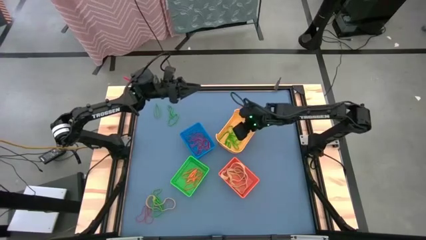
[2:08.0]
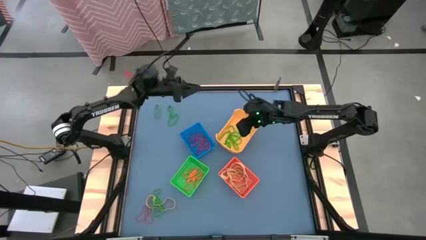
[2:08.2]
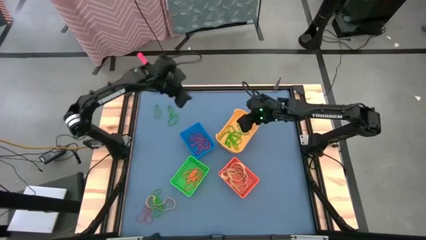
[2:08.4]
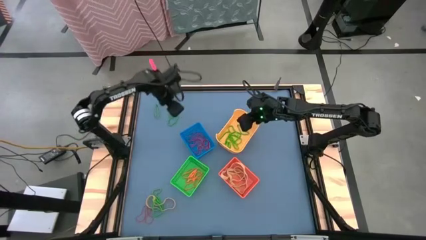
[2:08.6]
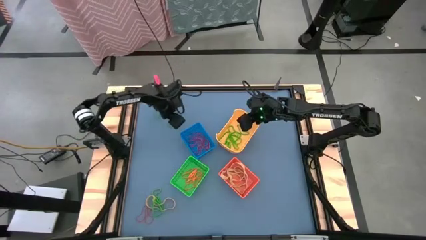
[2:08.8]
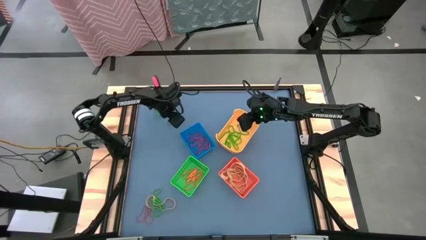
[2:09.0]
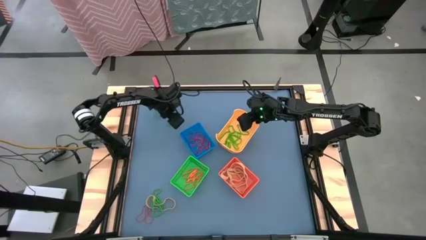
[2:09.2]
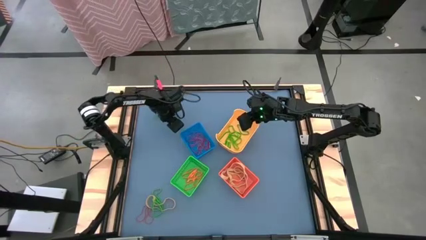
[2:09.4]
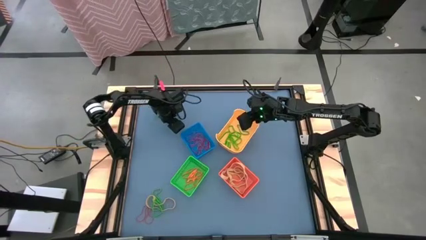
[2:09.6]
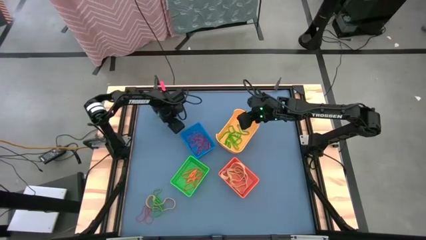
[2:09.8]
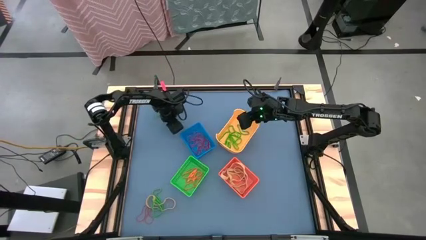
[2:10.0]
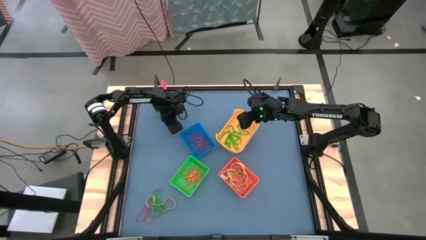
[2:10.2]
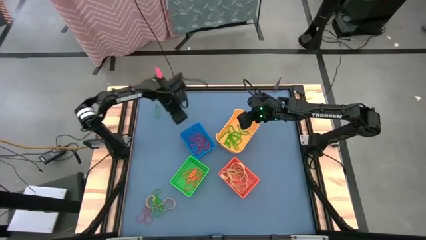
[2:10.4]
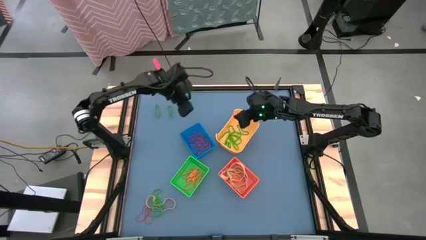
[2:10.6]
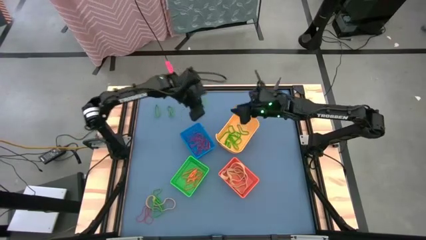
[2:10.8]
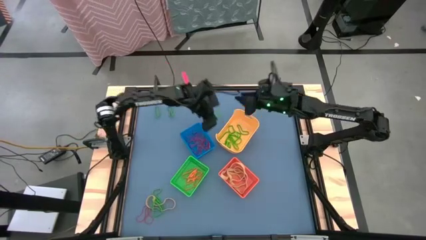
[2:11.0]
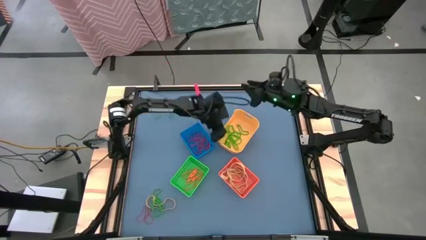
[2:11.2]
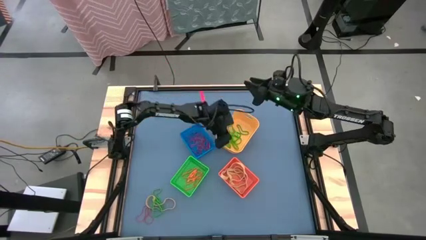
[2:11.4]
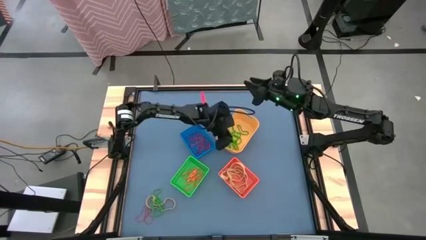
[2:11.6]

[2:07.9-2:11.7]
Task: Sort rubber bands into baskets
Put the green rubber band into the yellow bin

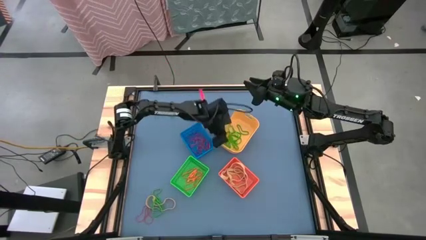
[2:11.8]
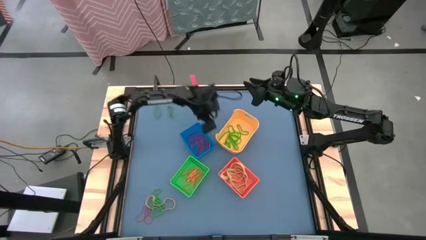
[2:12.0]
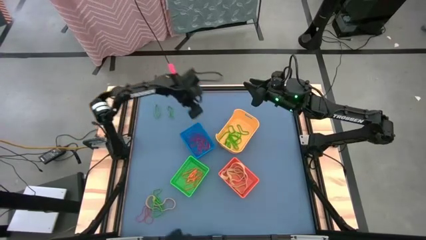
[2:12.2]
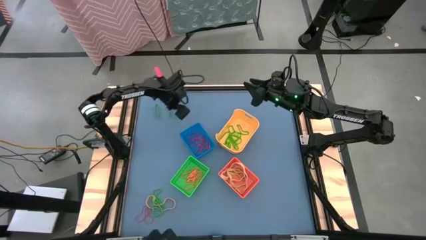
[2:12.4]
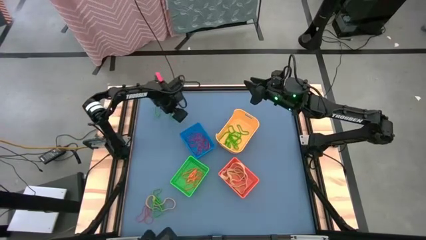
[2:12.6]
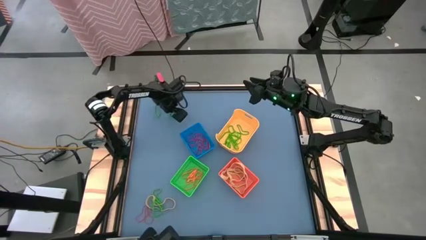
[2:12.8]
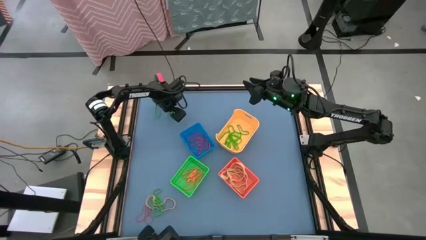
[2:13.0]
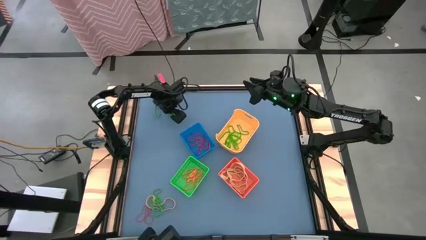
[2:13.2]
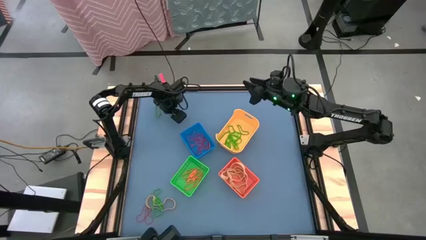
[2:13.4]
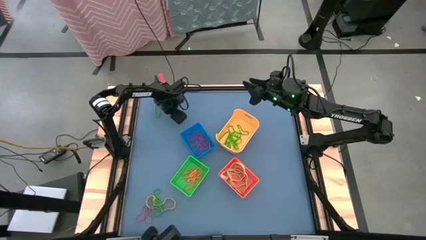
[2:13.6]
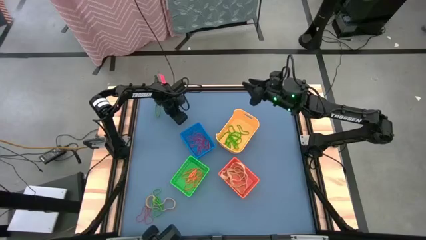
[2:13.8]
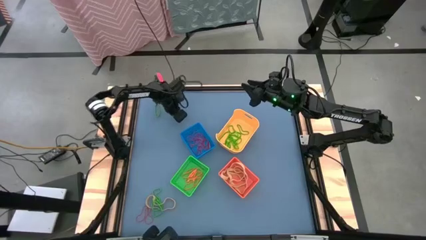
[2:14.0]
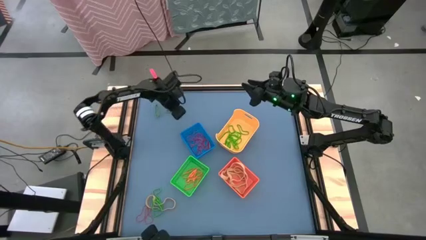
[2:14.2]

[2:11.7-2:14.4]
Put the green rubber band into the yellow bin

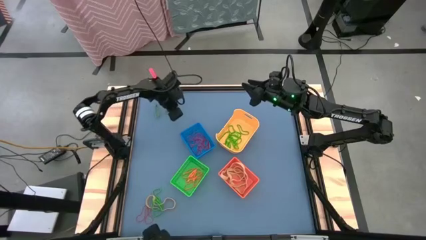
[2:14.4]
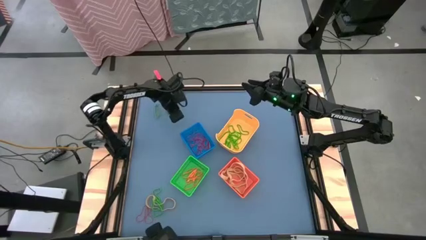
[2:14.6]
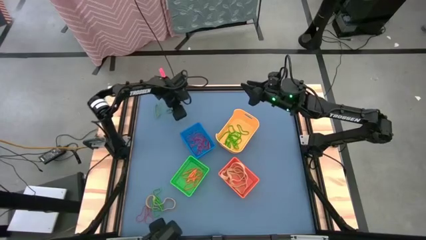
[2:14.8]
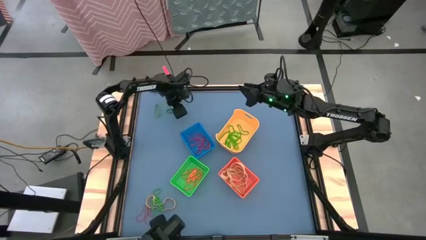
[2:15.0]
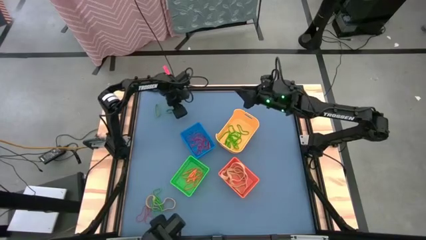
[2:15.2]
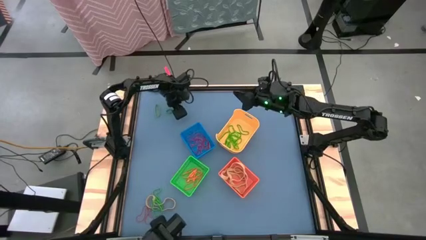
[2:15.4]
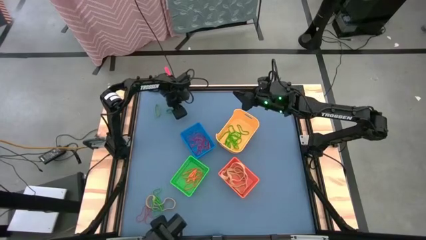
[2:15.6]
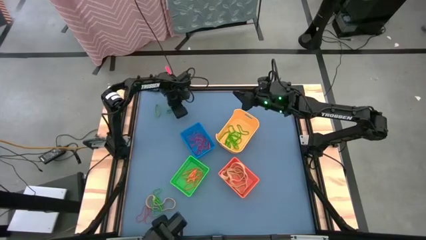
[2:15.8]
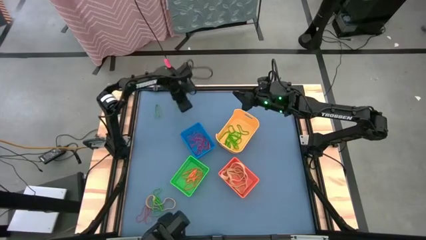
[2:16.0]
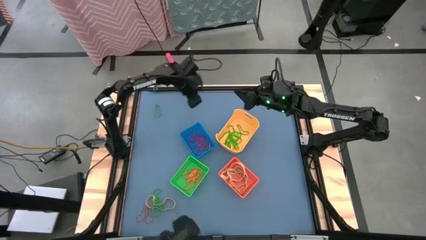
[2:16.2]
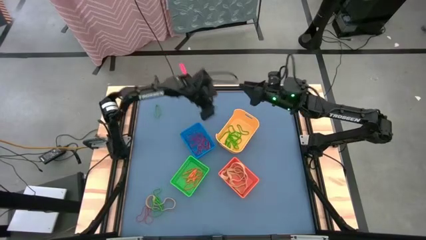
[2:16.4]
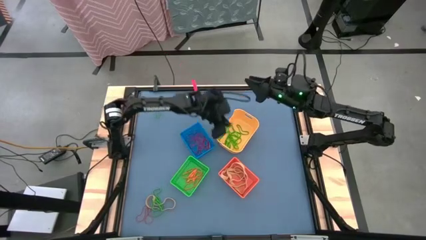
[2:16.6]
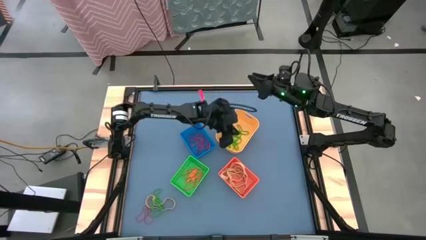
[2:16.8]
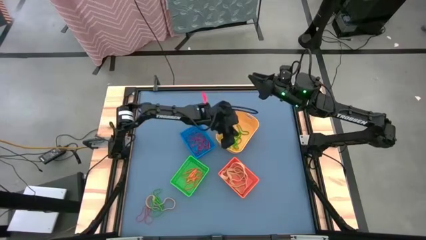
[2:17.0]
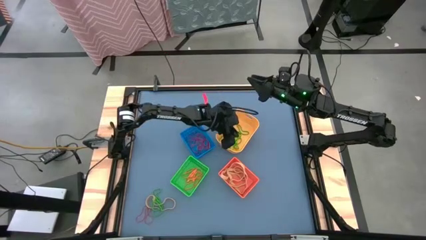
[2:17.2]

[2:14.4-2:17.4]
Put the green rubber band into the yellow bin

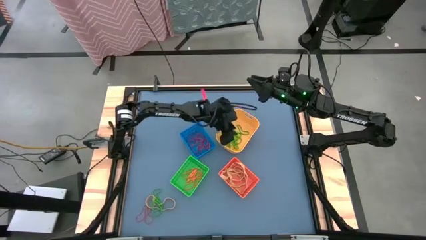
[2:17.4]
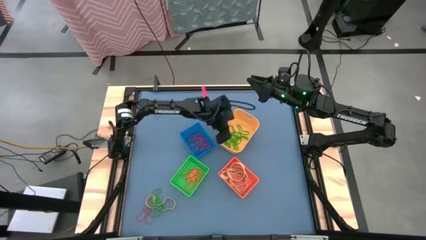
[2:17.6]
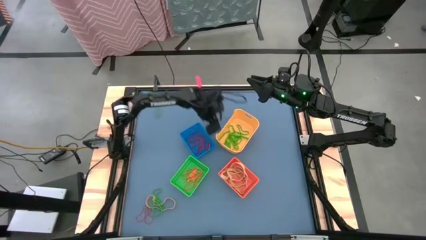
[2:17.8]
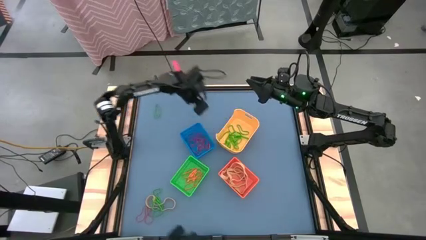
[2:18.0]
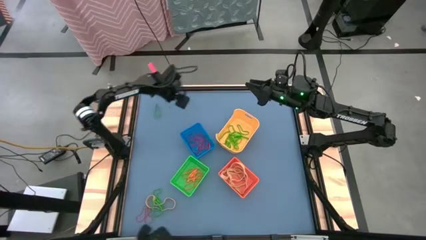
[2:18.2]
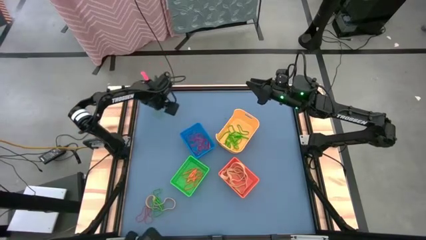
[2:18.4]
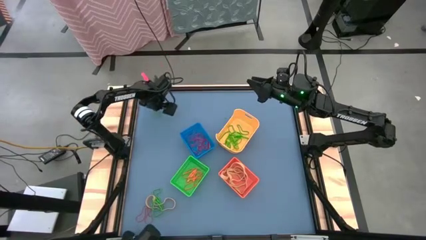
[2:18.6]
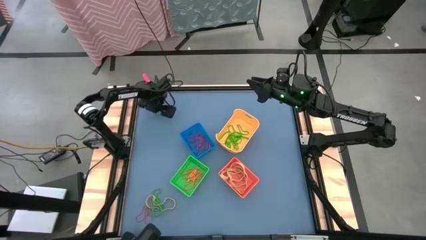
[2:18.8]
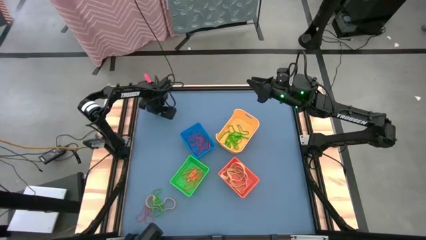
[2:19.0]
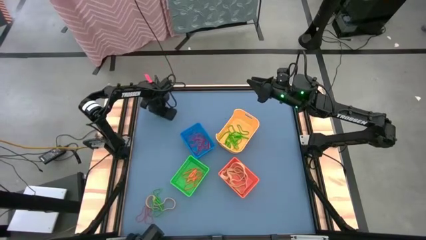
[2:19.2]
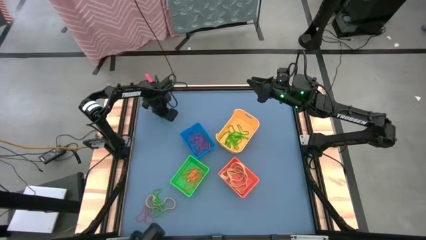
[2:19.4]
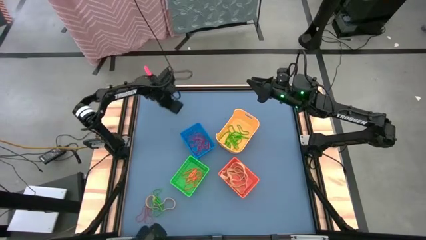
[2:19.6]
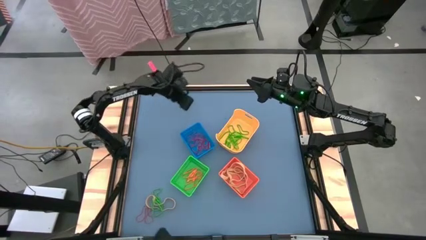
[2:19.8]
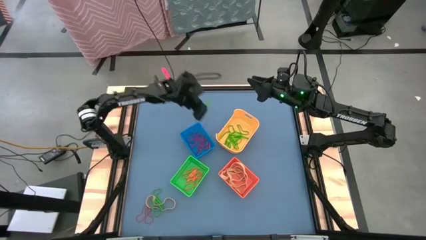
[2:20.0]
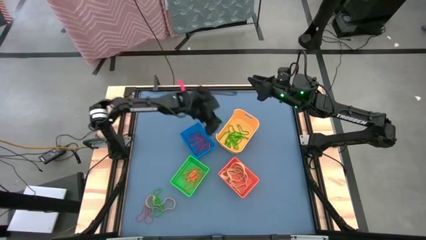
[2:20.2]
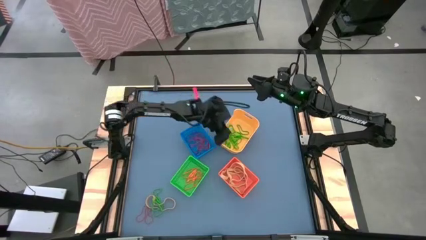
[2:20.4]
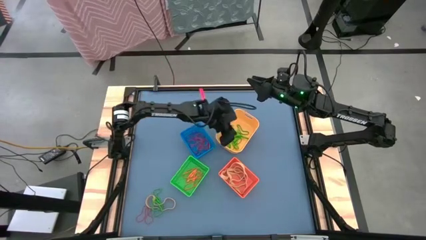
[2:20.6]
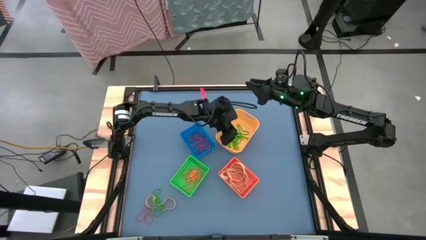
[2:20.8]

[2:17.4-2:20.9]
Put the green rubber band into the yellow bin

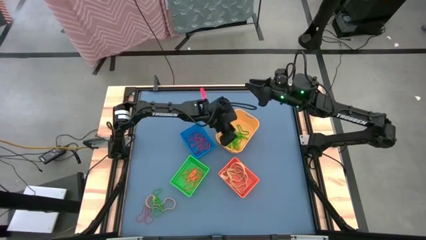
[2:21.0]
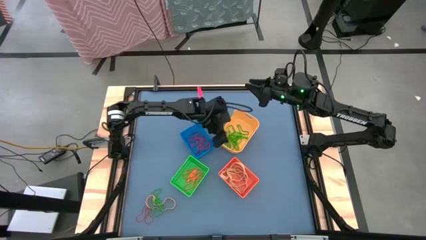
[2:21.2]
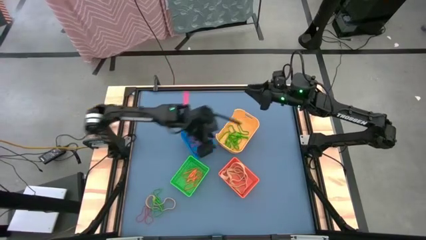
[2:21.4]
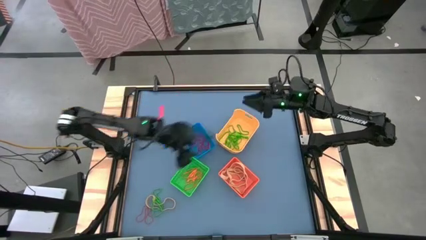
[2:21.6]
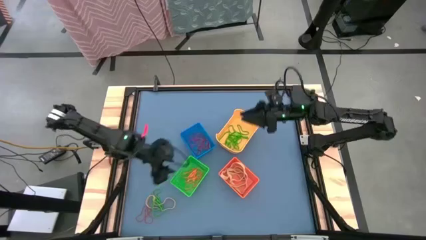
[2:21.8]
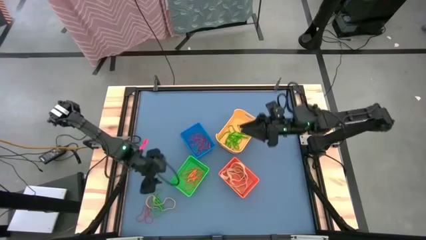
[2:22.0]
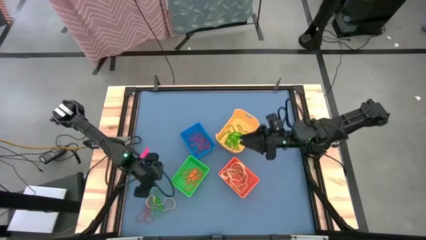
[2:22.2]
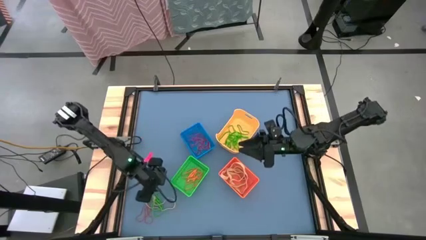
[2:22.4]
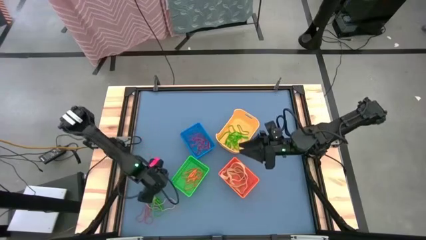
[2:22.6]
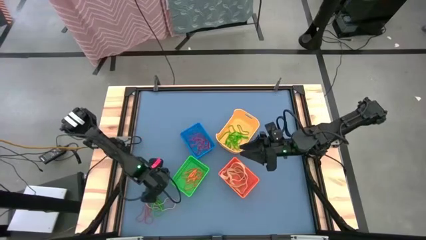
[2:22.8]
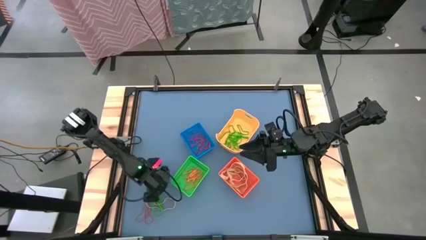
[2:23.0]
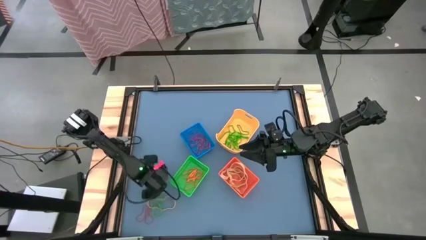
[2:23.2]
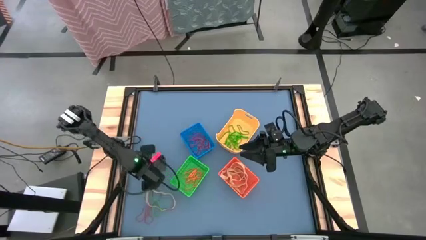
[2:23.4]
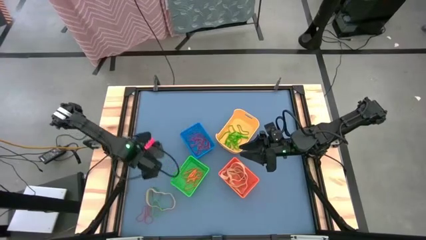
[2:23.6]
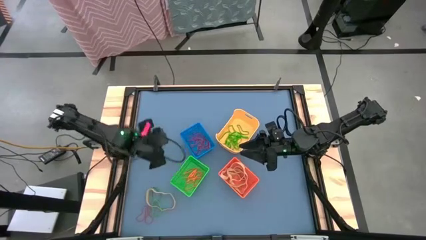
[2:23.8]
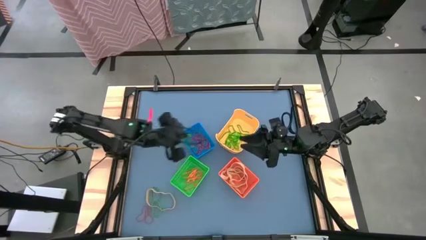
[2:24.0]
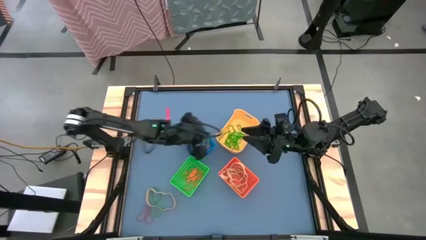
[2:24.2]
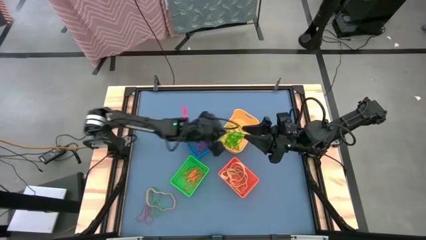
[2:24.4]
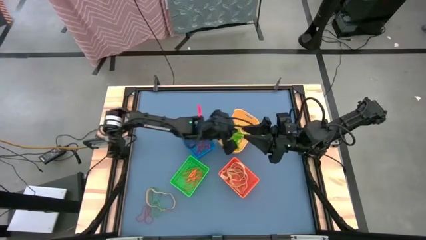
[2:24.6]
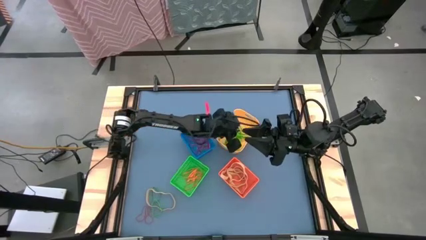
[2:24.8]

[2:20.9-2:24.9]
Put the green rubber band into the yellow bin
